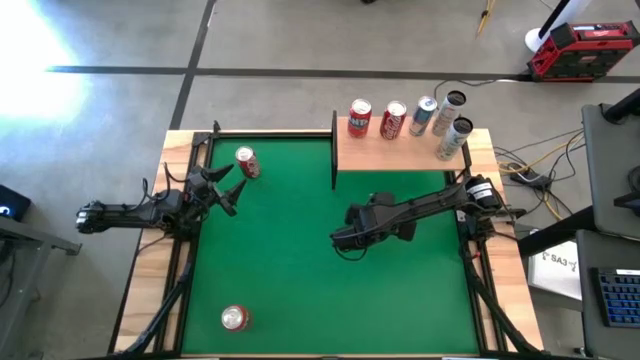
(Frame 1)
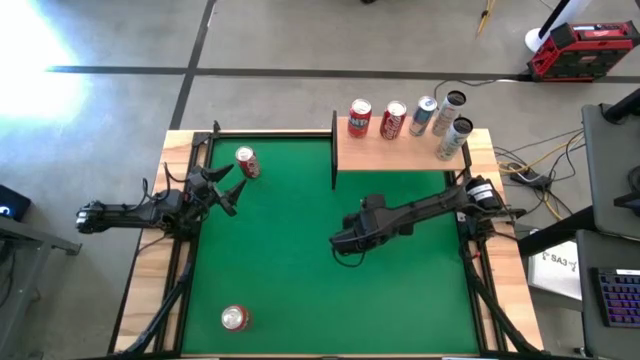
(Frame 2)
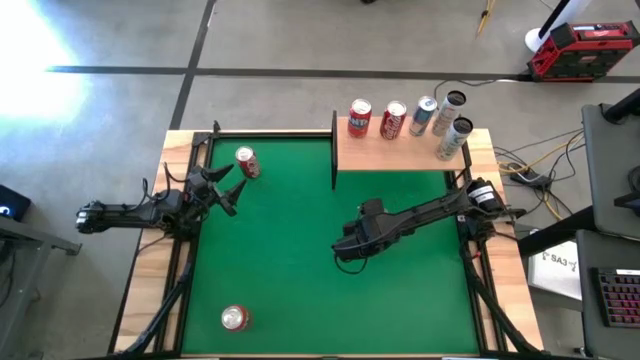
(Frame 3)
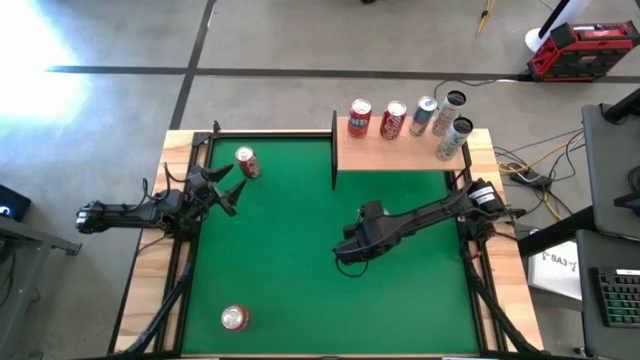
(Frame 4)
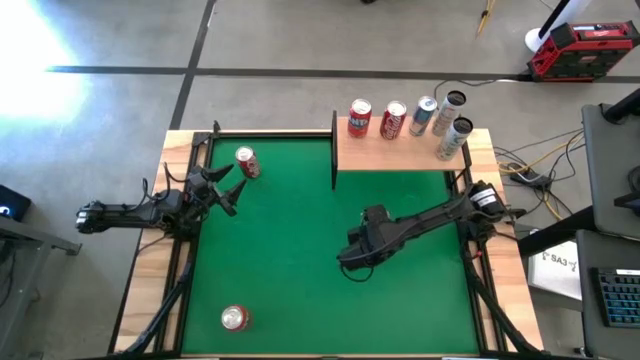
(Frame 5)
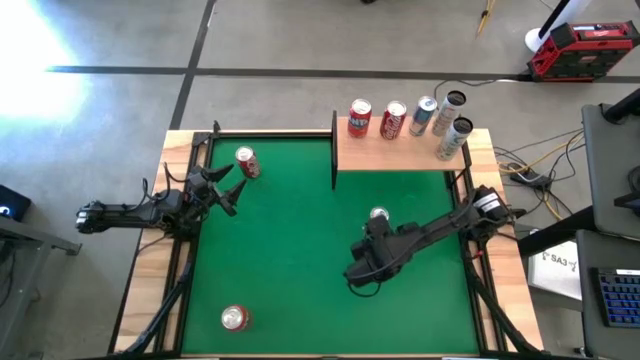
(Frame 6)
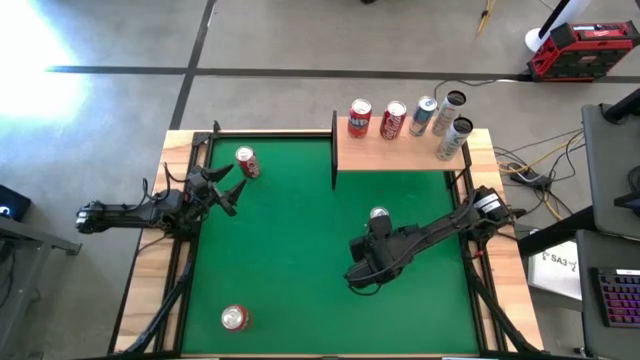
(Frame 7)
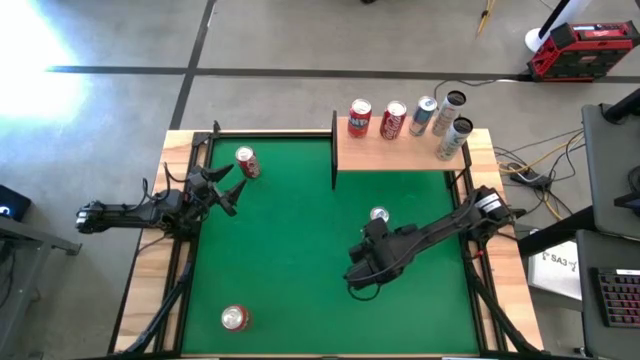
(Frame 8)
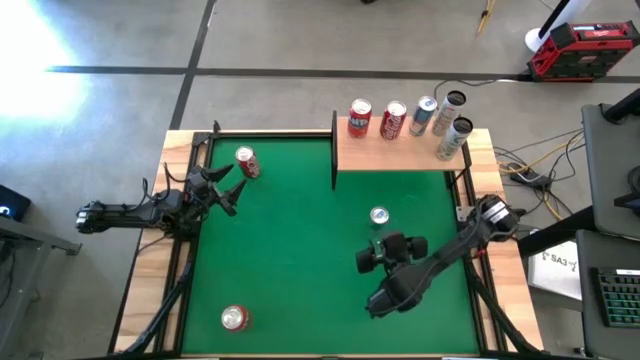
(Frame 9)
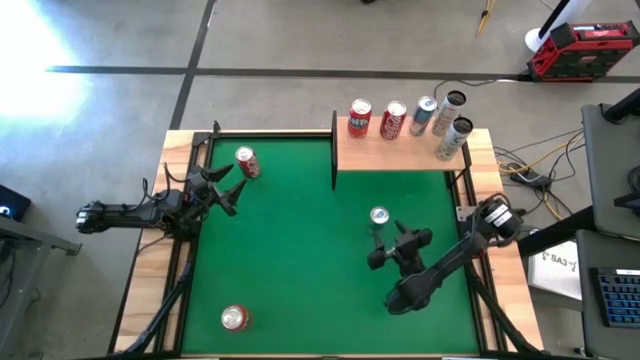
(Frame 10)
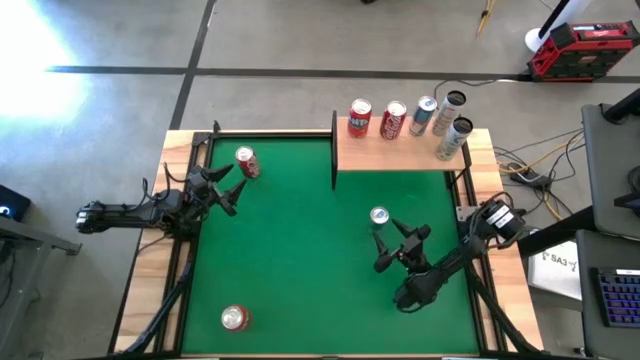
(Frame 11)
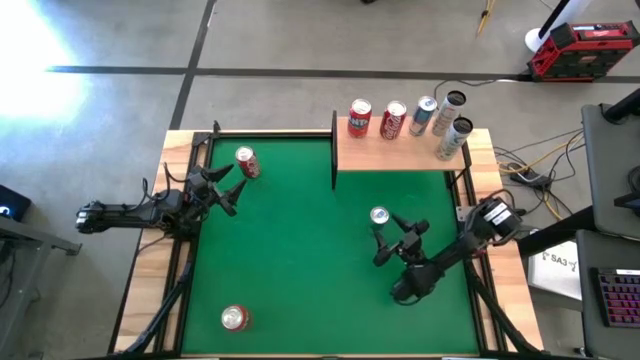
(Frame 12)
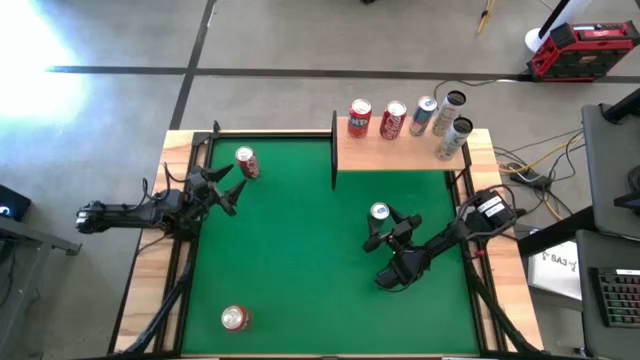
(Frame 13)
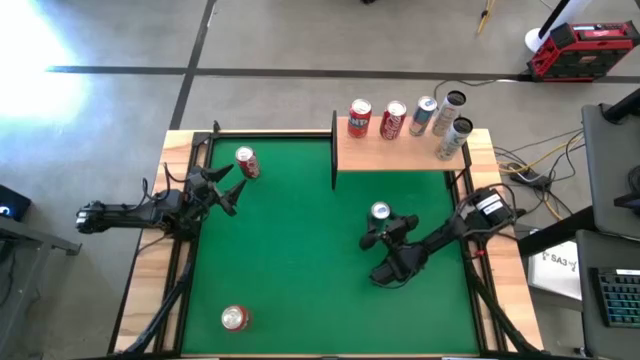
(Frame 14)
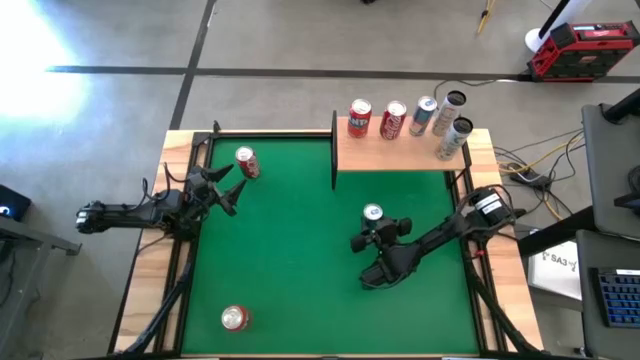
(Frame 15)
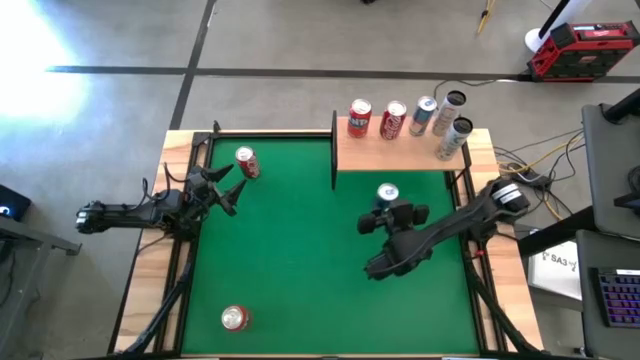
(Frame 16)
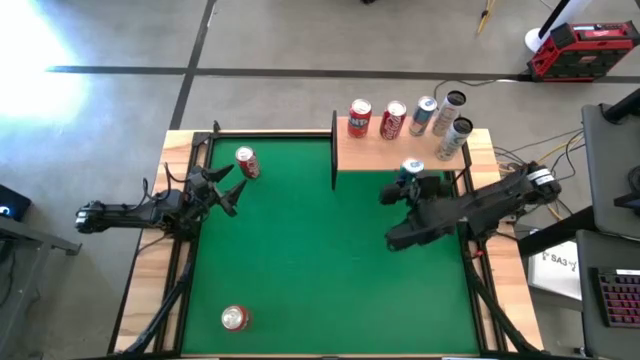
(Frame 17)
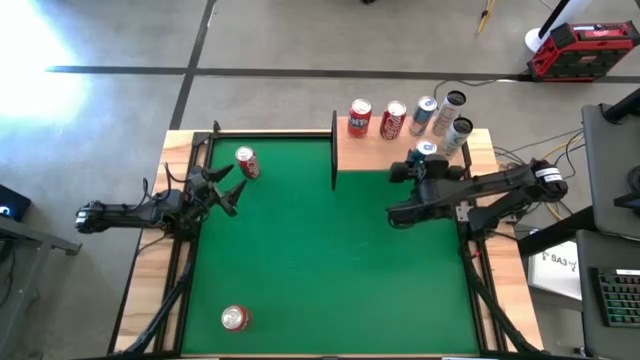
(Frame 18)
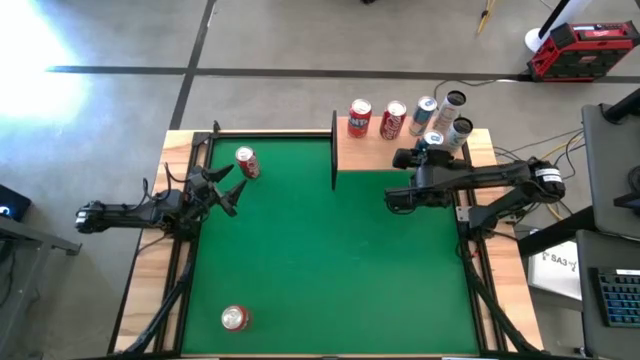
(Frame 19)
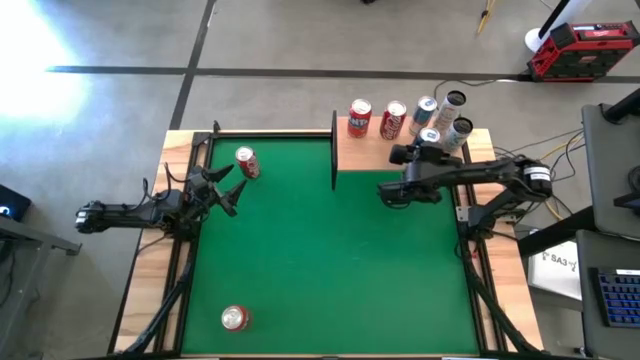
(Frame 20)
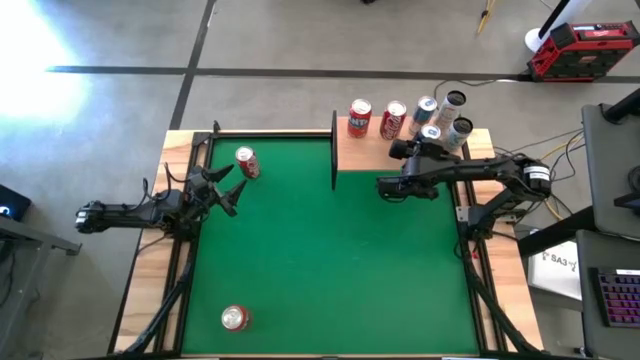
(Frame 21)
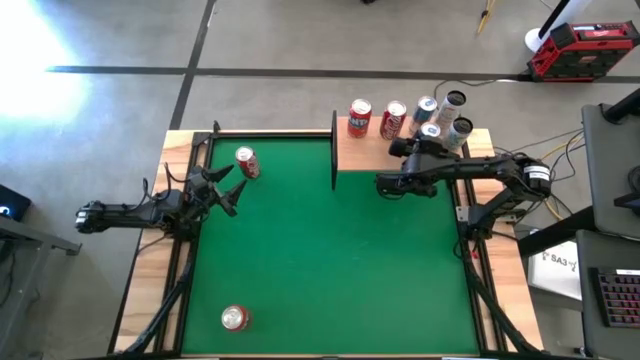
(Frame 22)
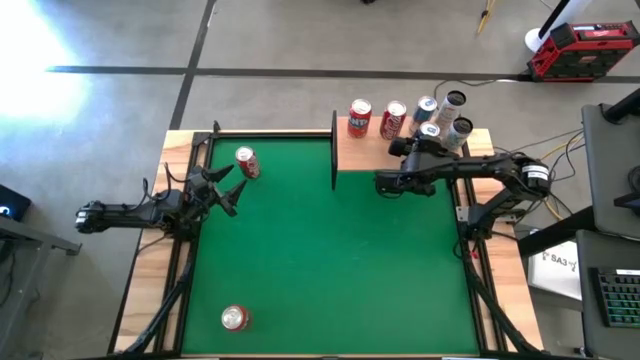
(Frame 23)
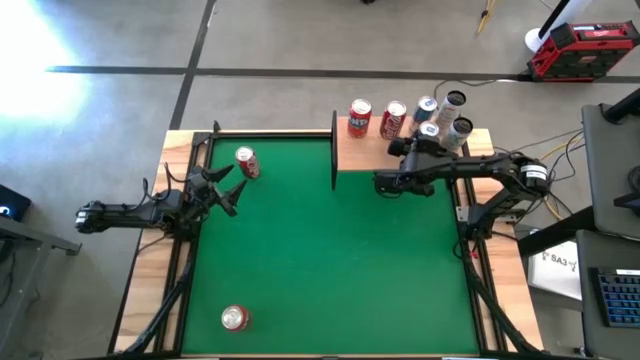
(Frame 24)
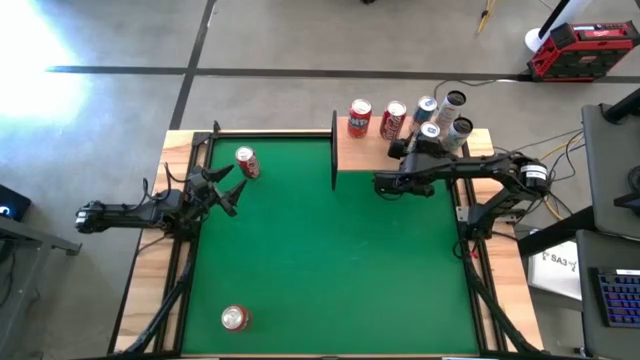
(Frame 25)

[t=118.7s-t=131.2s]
Task: Place canned beverage on shelf
Put the blue soda can on the shelf aligned with the other blue soda can

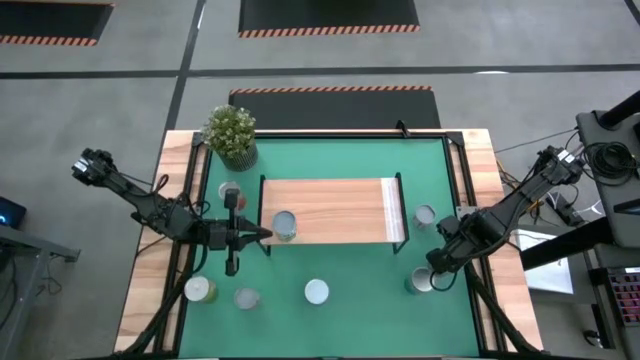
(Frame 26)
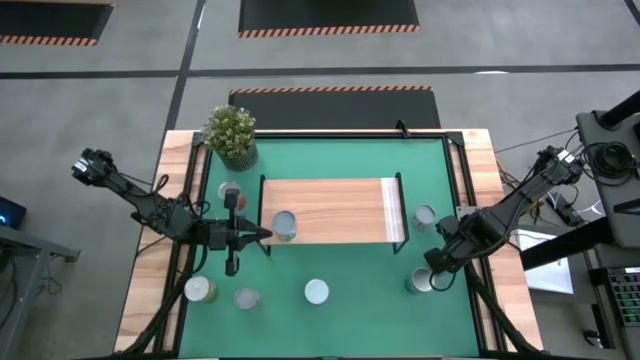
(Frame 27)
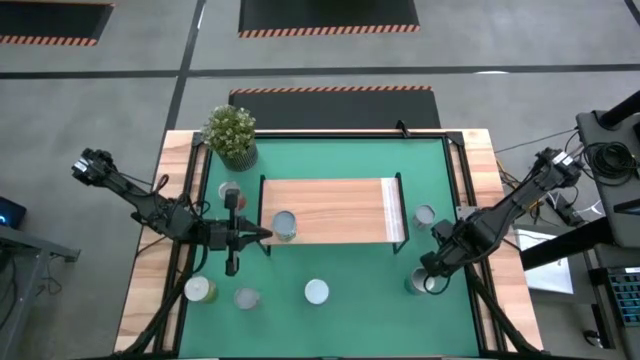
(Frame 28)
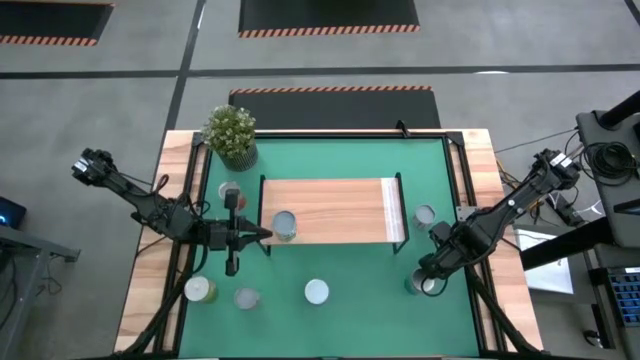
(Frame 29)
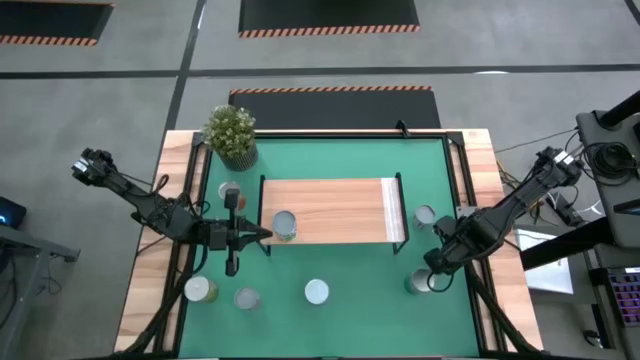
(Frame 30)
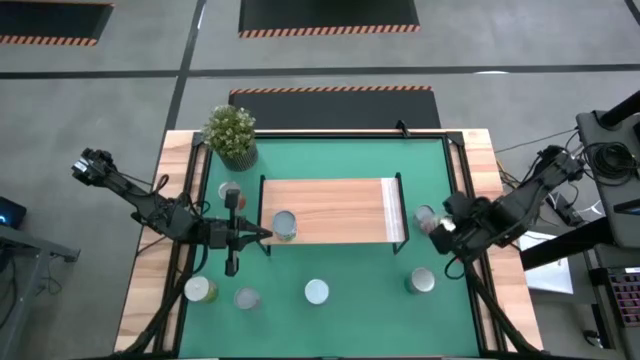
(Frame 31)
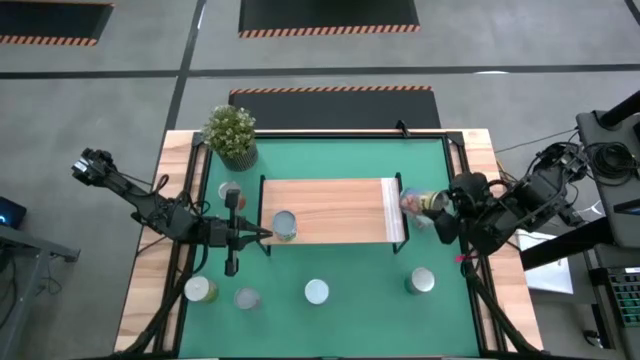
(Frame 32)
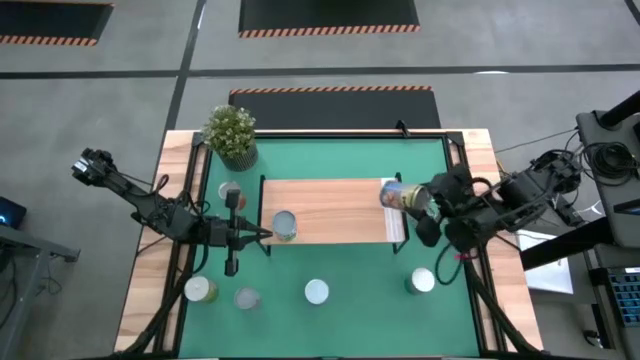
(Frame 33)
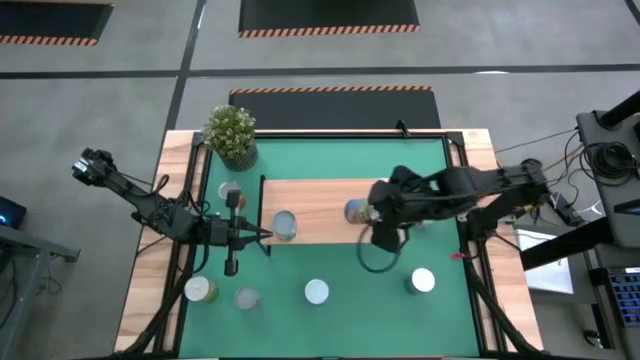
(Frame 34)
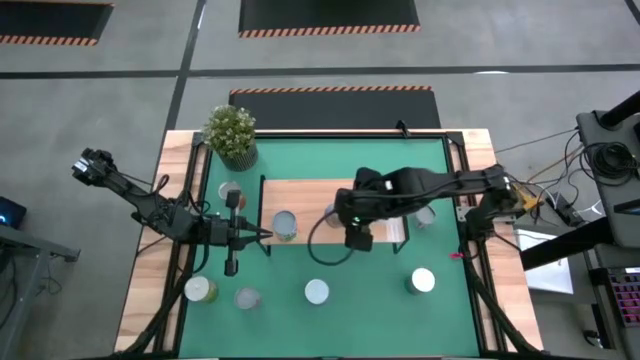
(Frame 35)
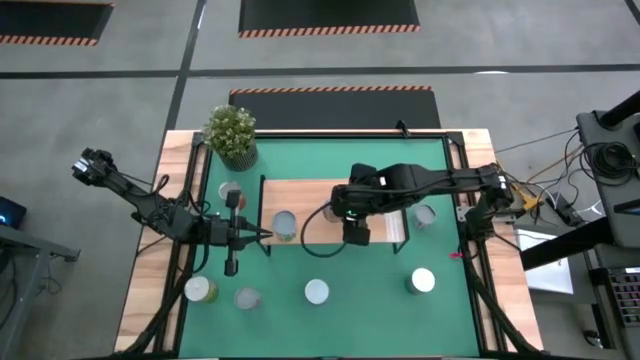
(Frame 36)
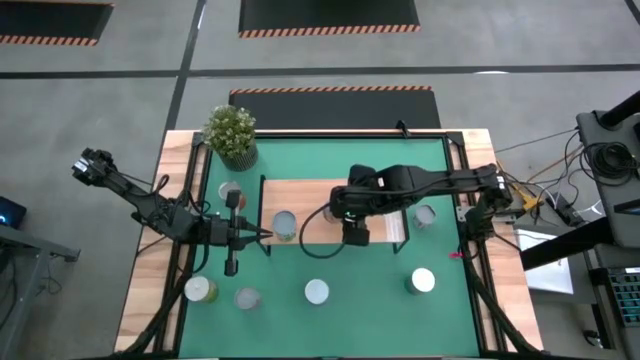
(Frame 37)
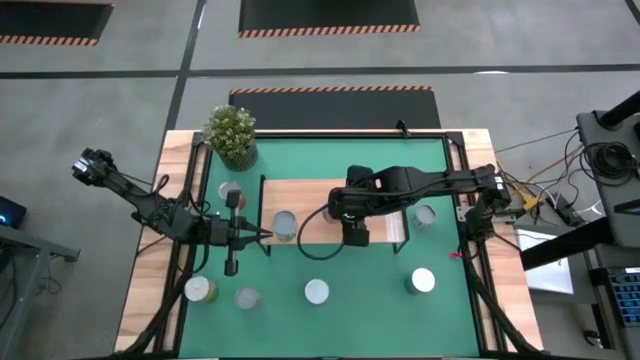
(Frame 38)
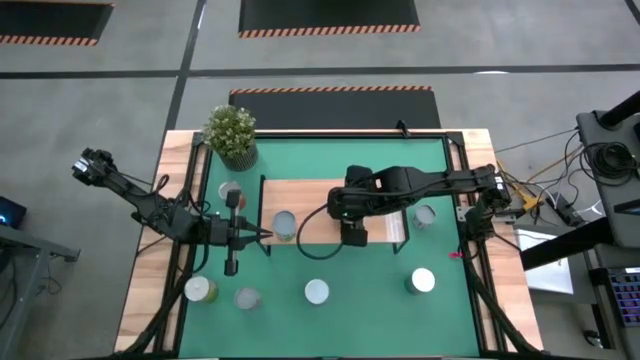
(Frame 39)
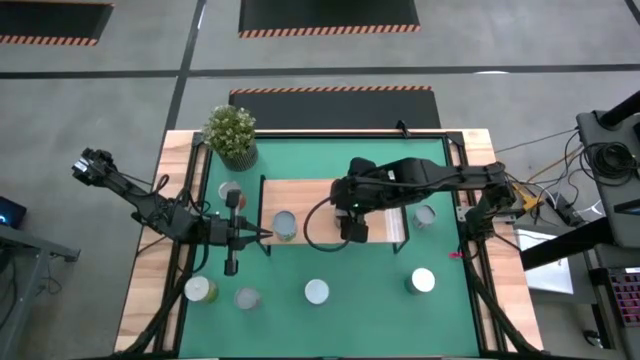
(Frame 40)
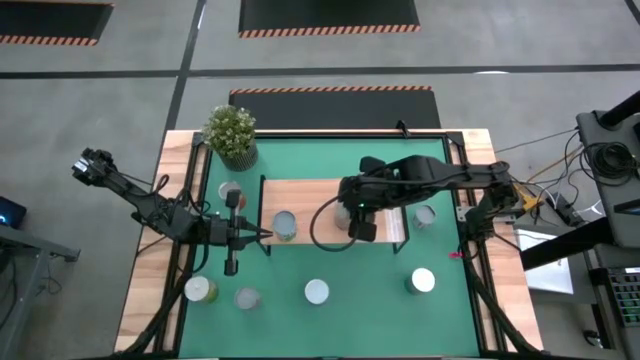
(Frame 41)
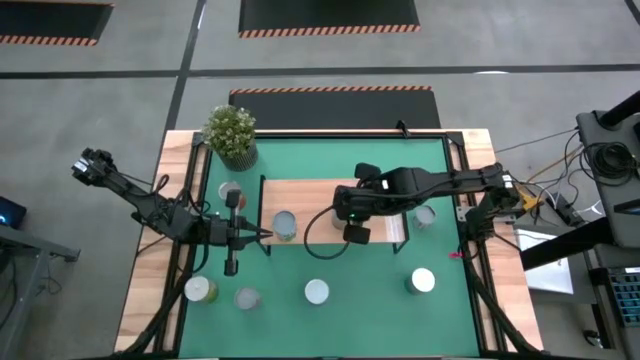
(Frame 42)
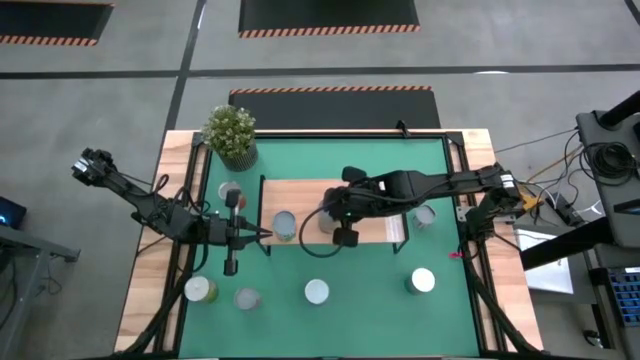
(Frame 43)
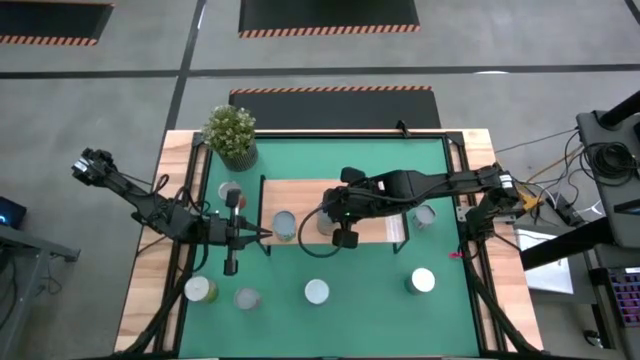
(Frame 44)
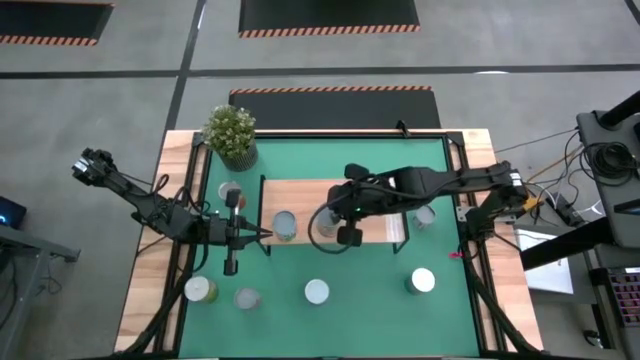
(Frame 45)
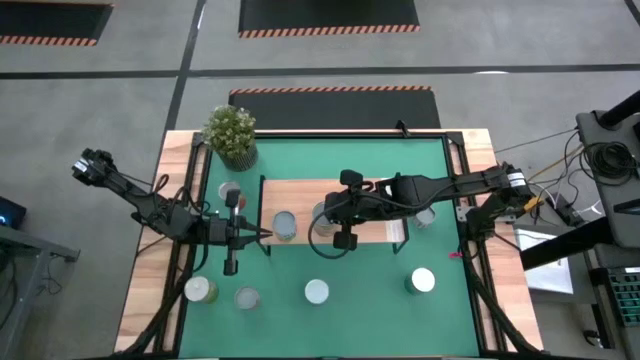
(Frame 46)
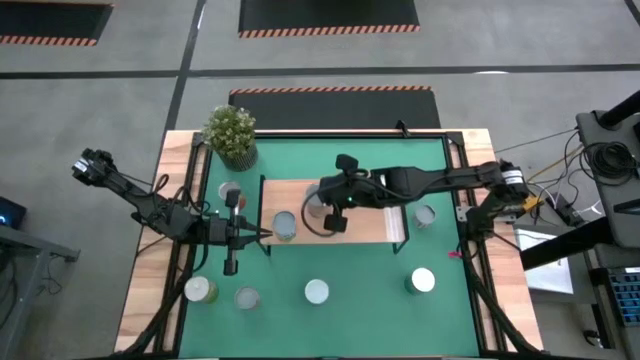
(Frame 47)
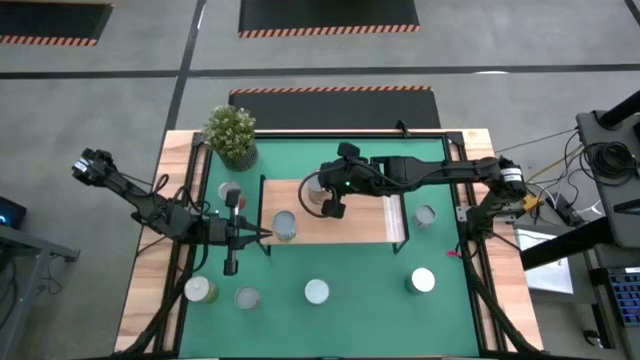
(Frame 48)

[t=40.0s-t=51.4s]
Task: Pick and place cans onto a shelf
Put the canned of peaches on the shelf
